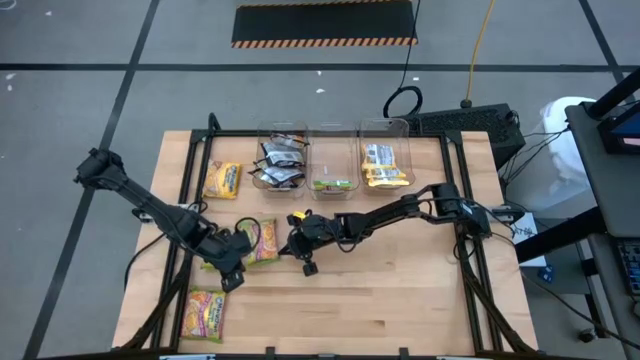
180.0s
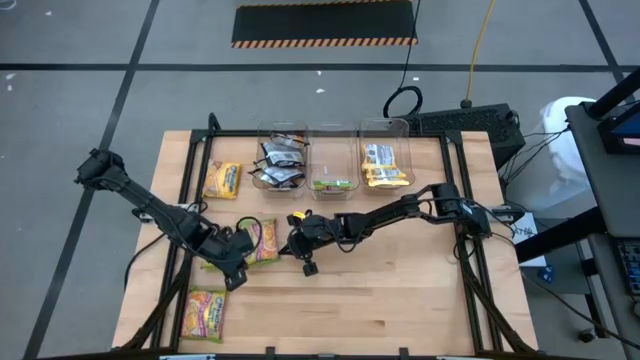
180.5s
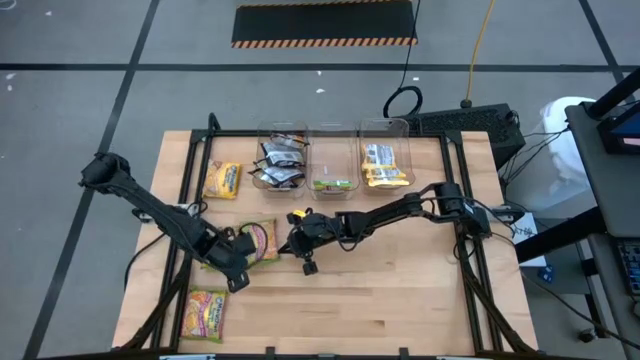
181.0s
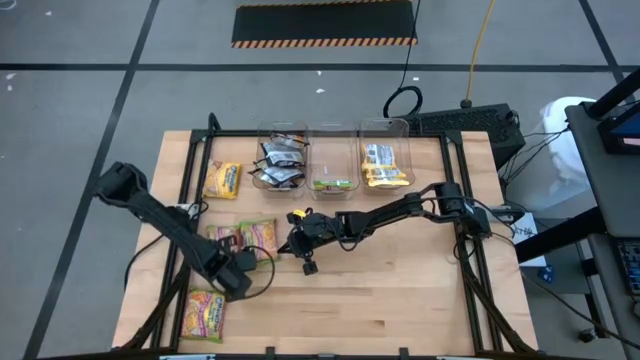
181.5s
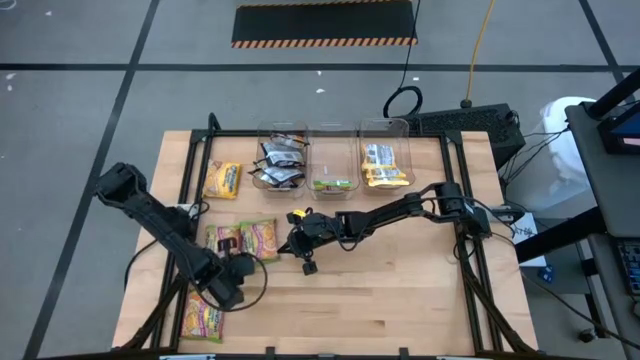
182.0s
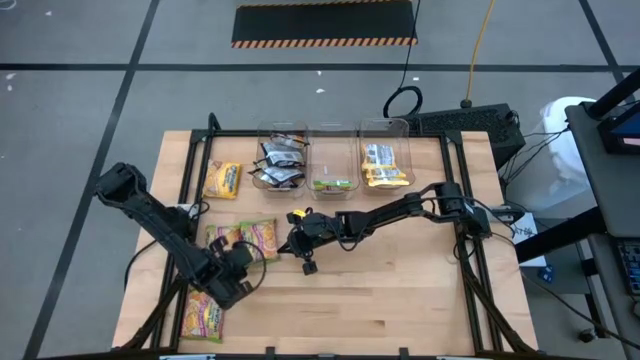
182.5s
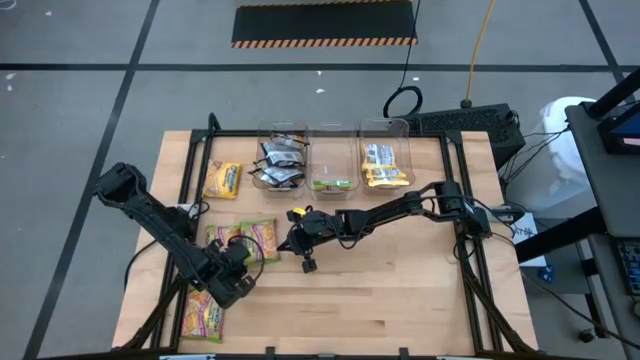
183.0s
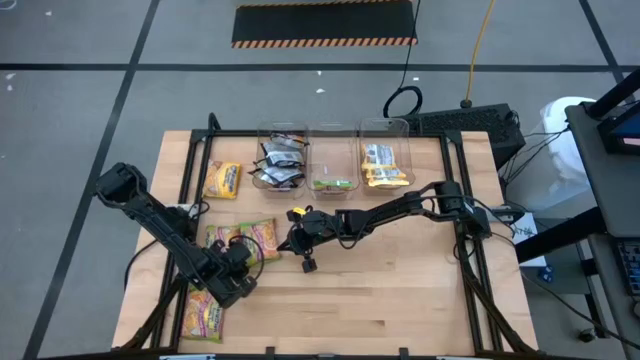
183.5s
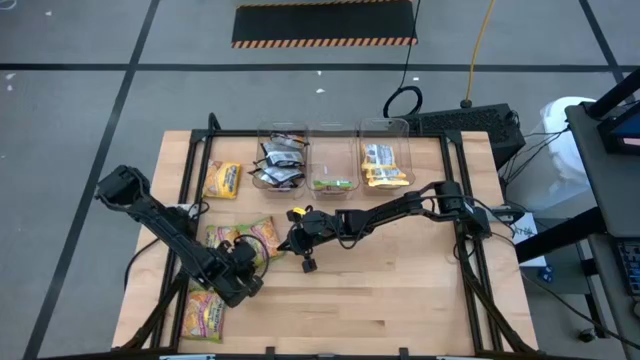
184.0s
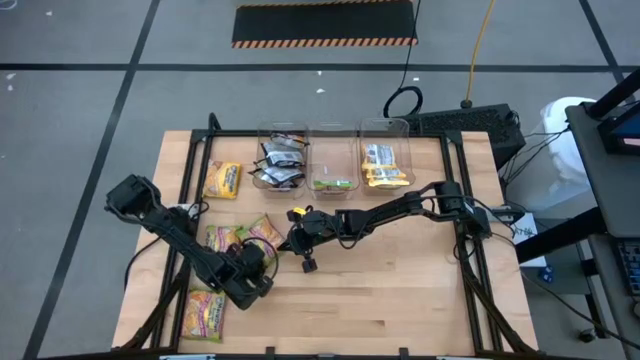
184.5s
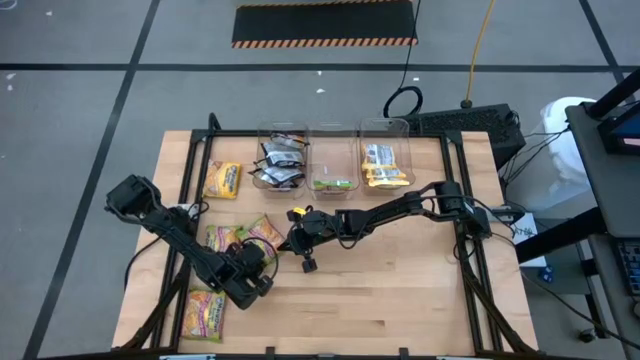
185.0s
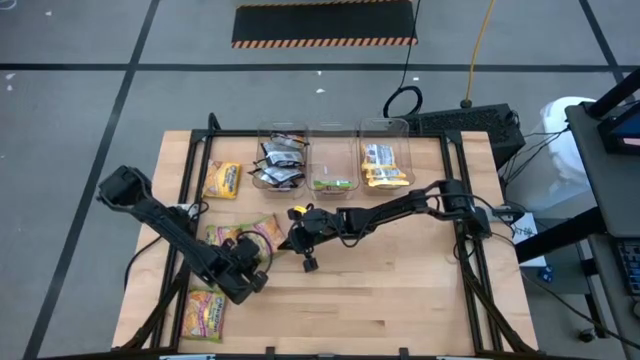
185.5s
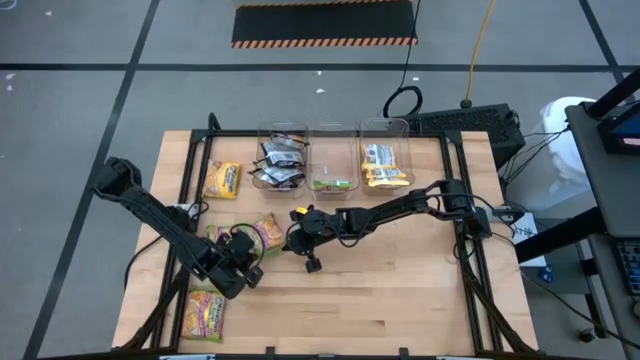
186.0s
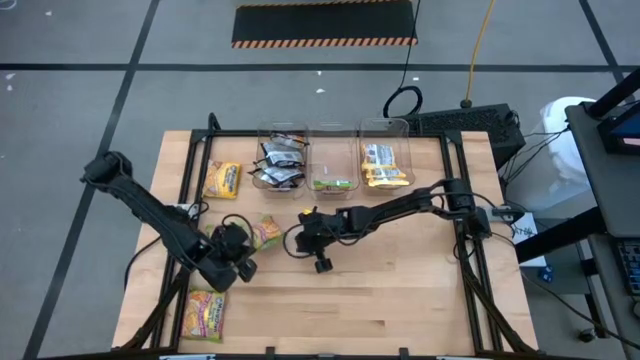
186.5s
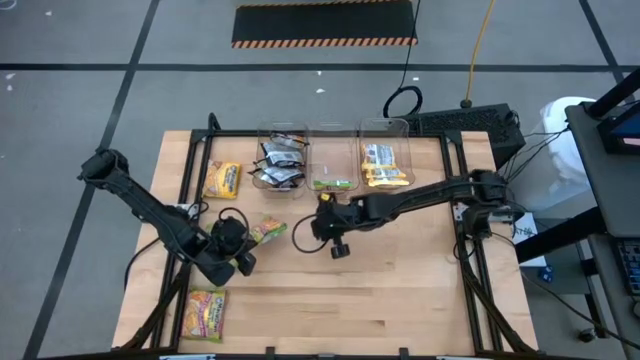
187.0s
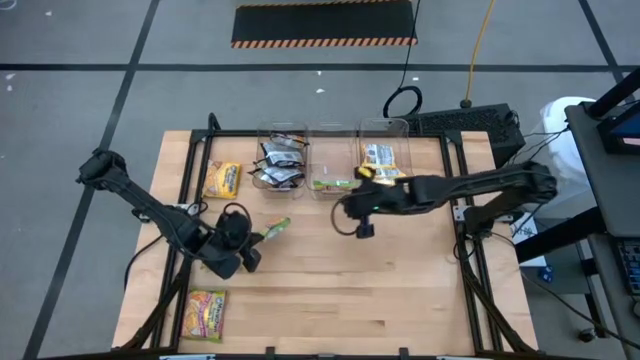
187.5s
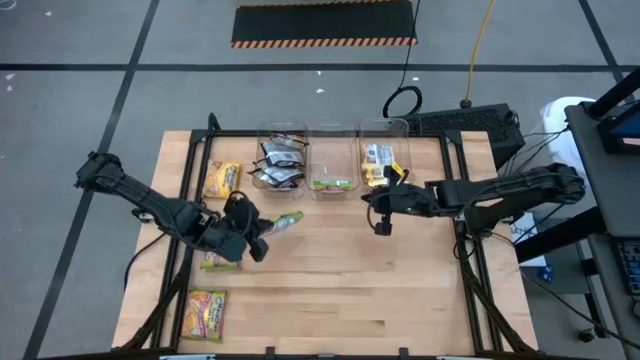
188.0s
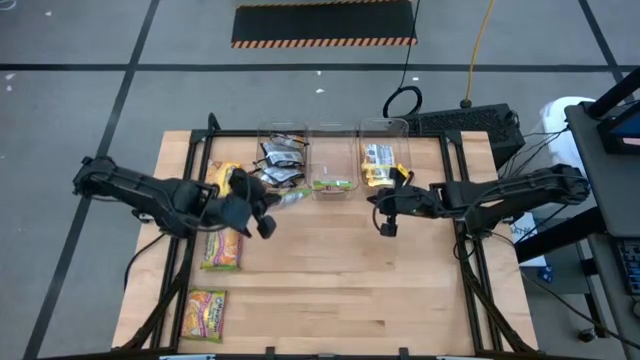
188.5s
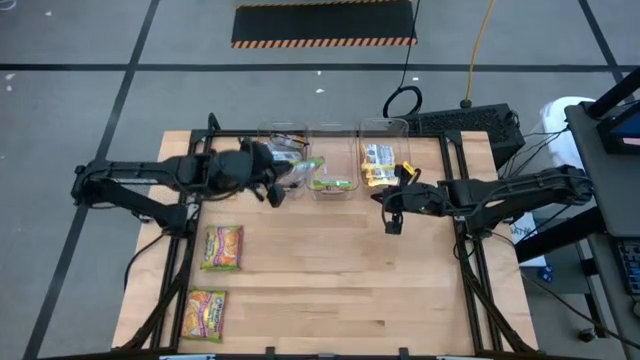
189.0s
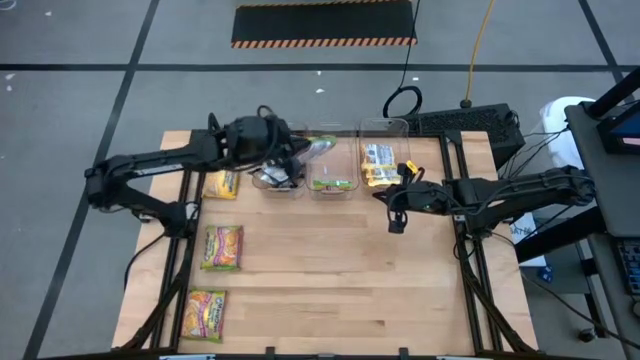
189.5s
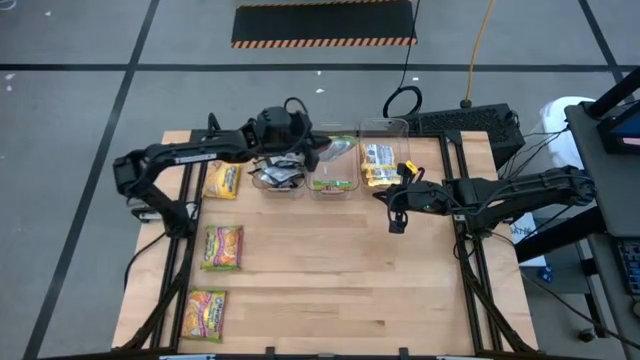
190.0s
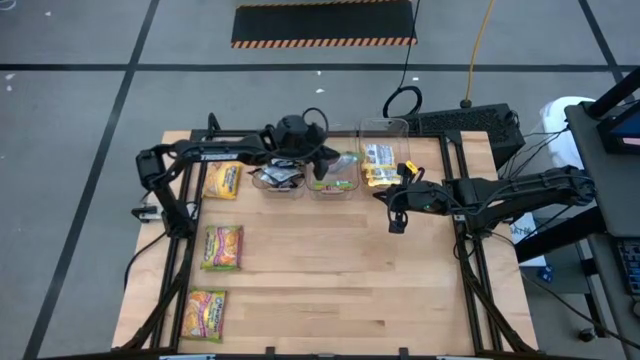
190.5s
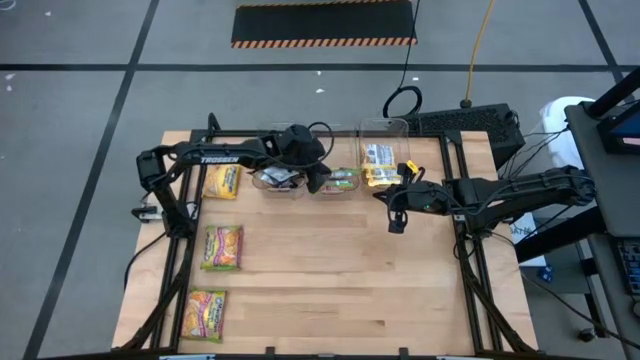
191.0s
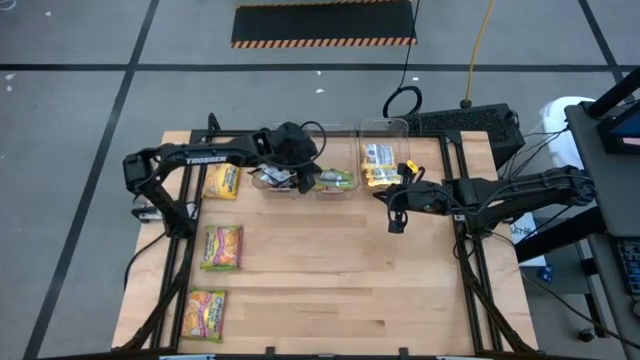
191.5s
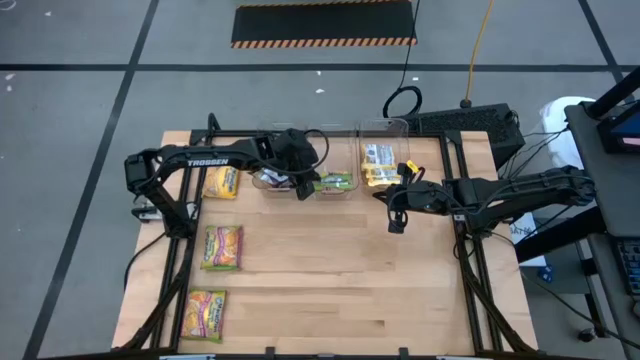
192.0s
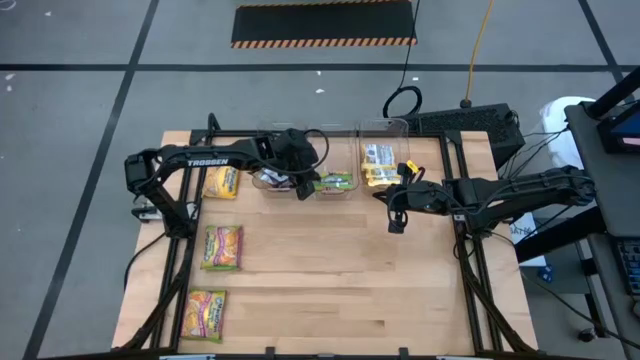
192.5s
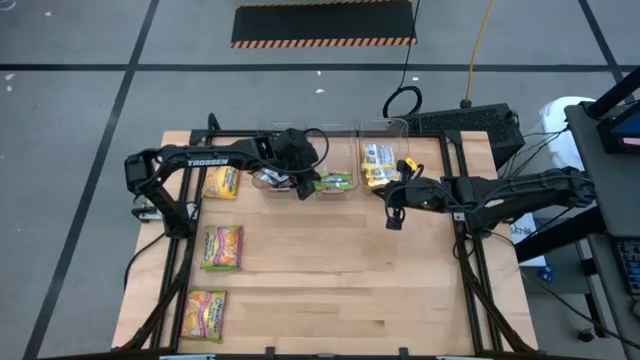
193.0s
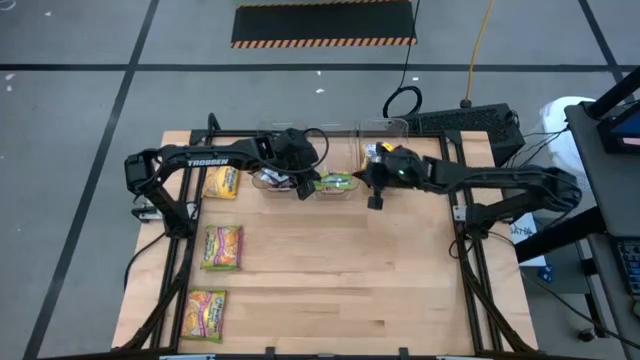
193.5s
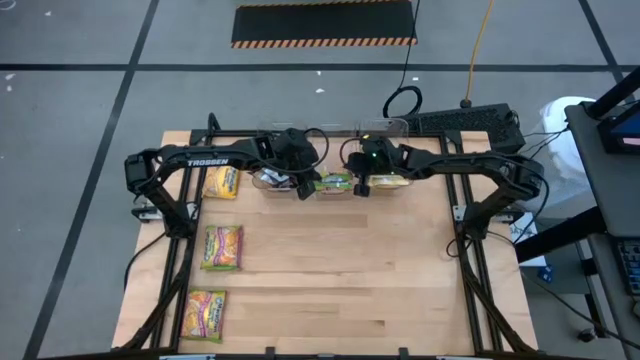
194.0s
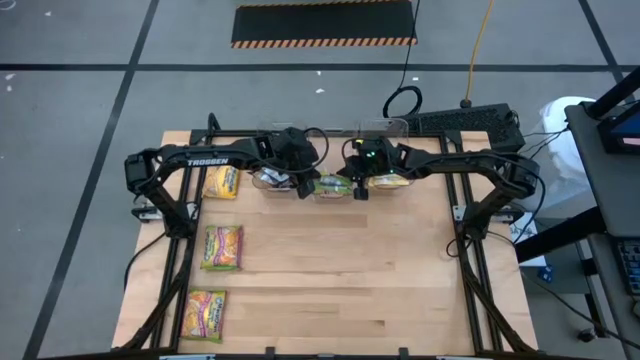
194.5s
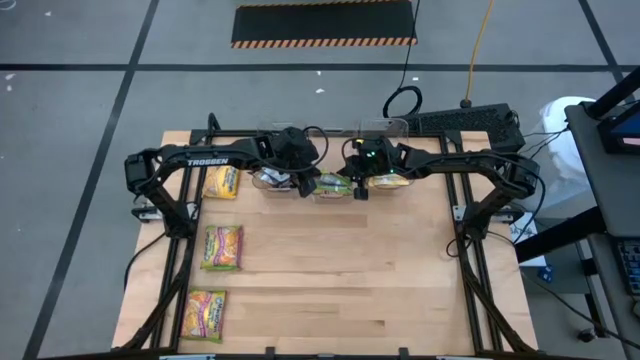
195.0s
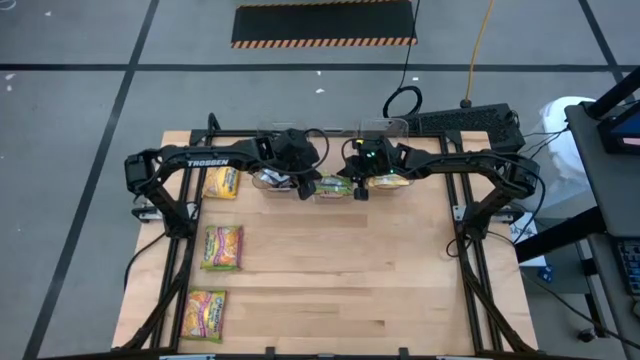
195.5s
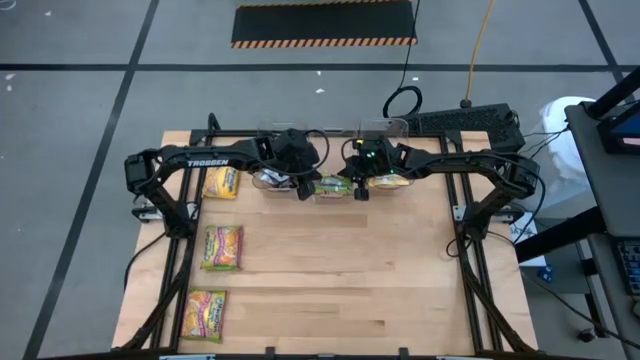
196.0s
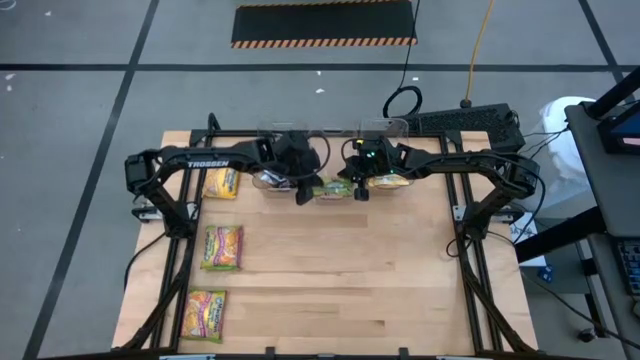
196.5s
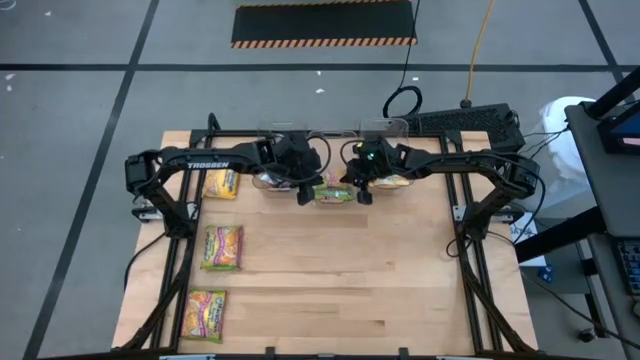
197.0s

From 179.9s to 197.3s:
Task: Sort Maruchan noodles
Put the green noodle pack into the middle transparent bin
